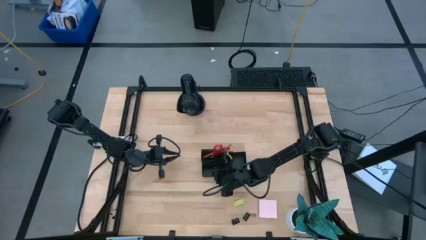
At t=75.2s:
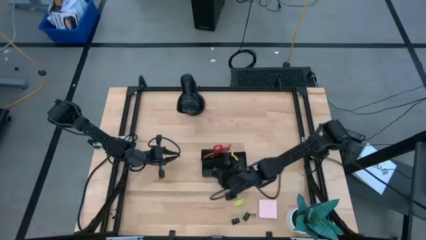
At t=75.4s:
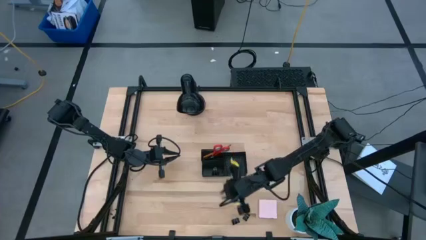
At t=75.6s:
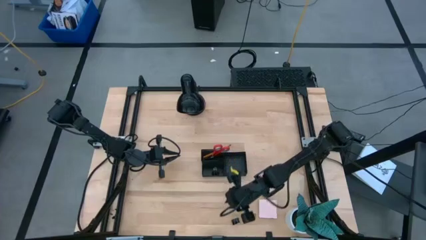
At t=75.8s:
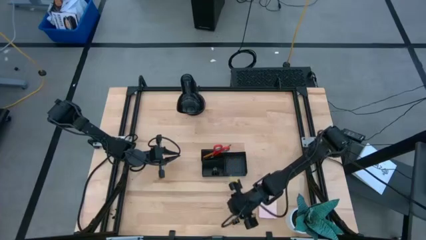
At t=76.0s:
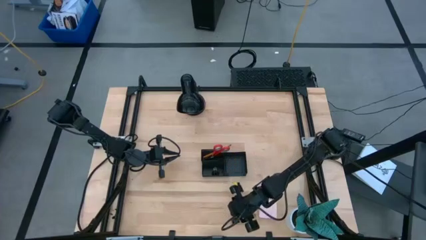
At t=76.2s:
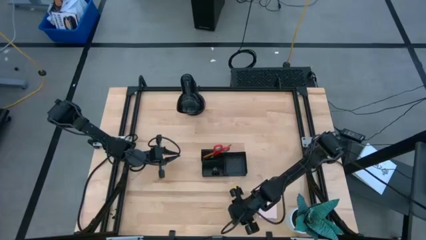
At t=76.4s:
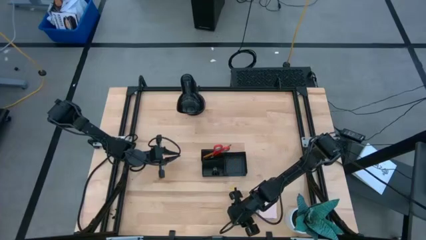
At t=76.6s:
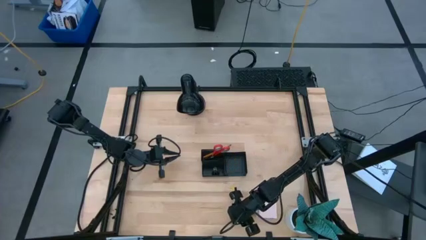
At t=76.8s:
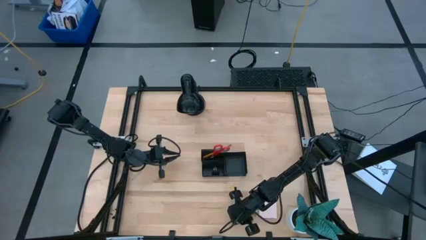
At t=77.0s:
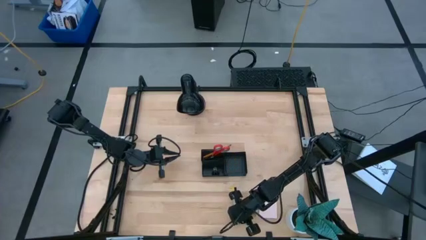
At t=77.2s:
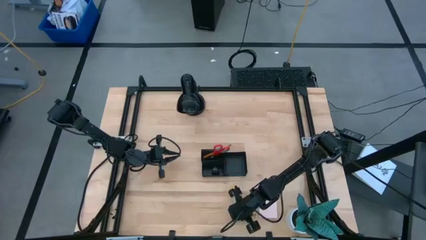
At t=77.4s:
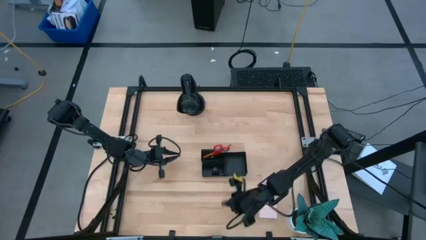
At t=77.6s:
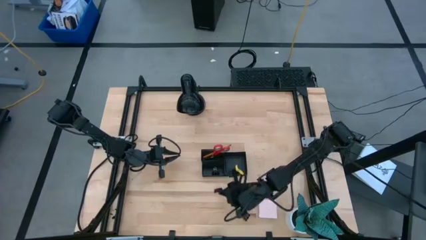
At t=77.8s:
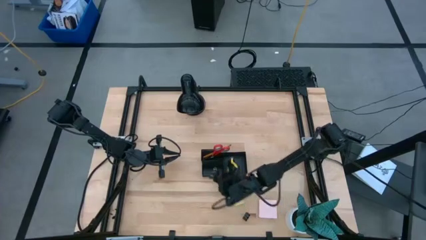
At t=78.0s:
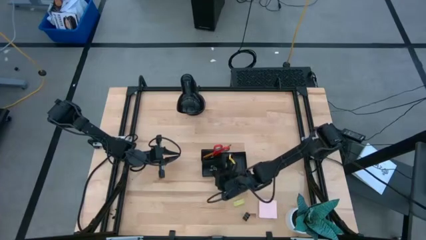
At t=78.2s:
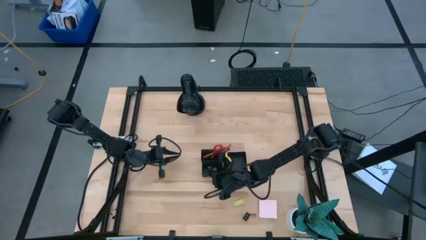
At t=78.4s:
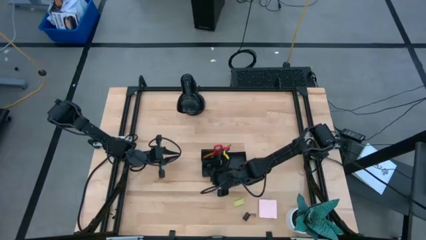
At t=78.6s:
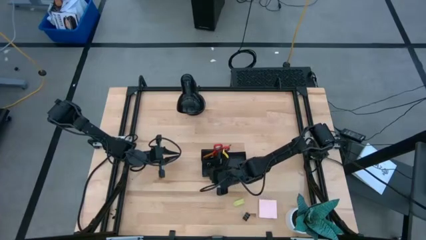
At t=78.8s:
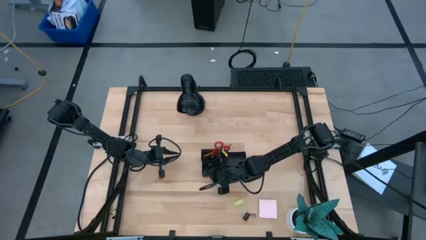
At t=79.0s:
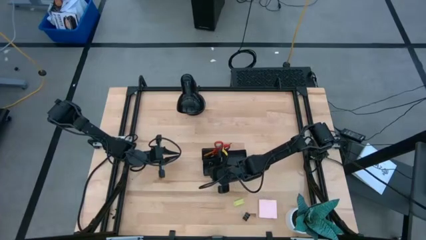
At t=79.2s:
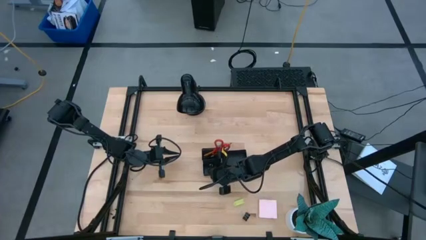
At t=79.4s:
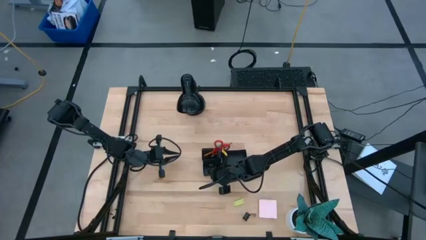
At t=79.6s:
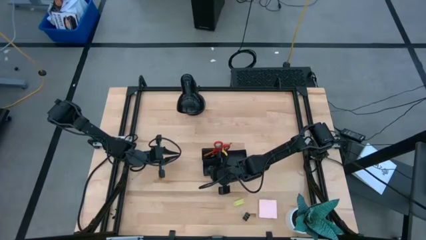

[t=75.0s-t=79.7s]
Task: Pick and place office supplies into organizer
Put the left binder clip into the desk organizer

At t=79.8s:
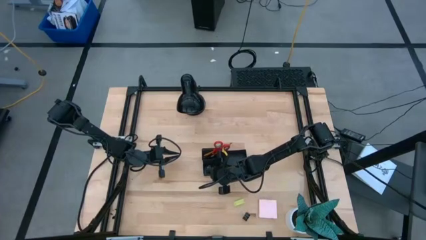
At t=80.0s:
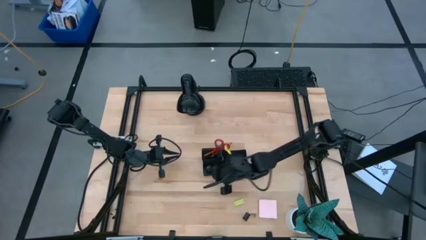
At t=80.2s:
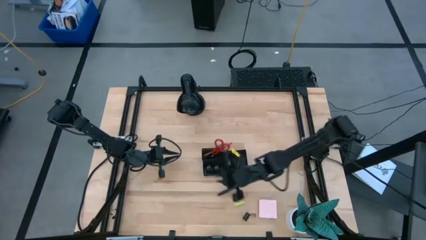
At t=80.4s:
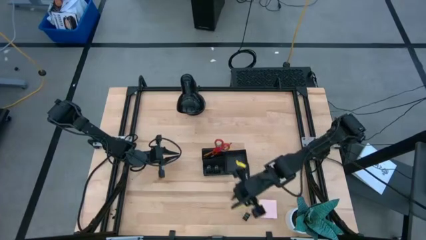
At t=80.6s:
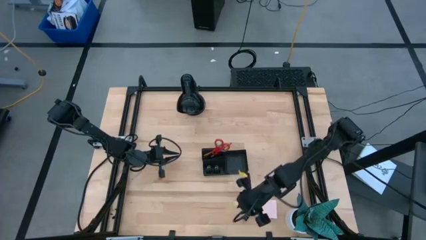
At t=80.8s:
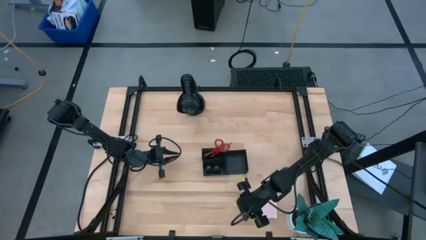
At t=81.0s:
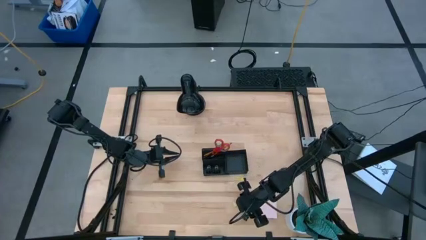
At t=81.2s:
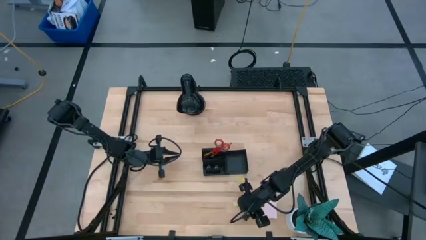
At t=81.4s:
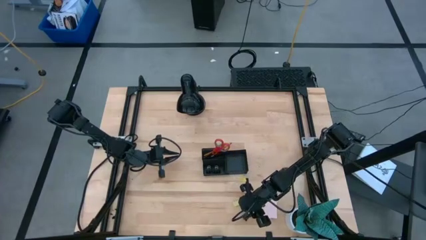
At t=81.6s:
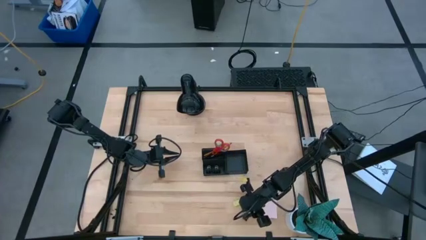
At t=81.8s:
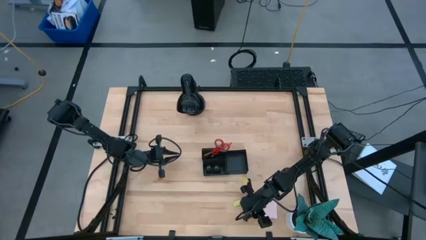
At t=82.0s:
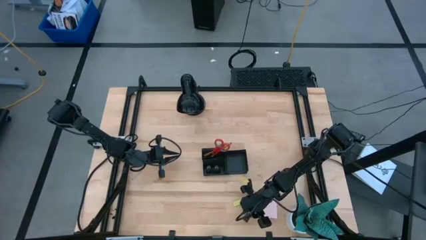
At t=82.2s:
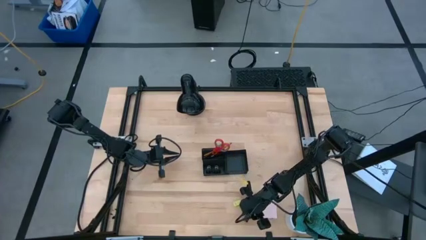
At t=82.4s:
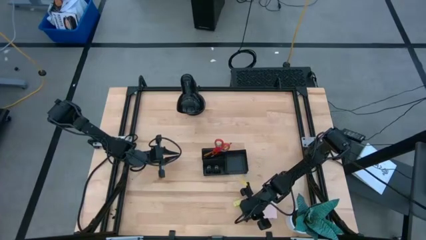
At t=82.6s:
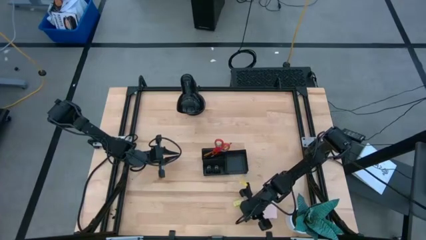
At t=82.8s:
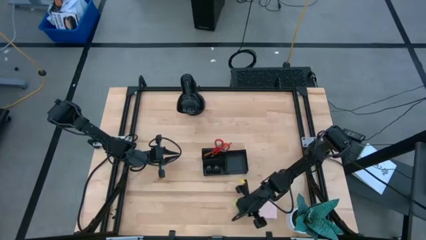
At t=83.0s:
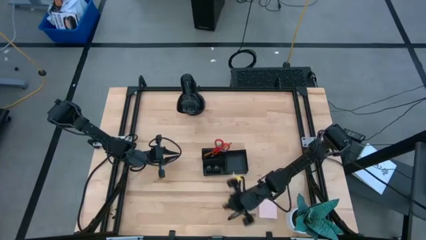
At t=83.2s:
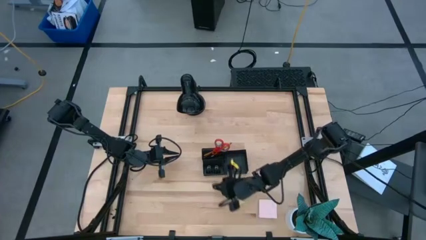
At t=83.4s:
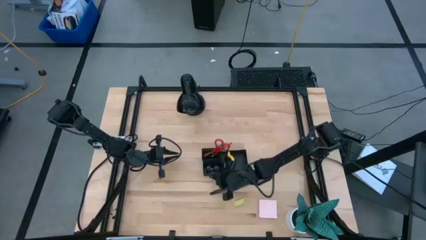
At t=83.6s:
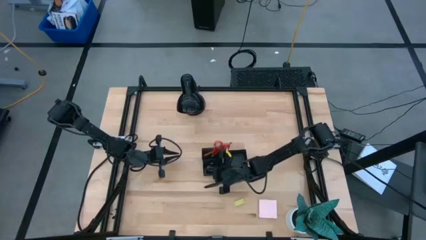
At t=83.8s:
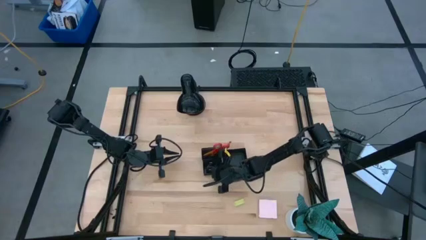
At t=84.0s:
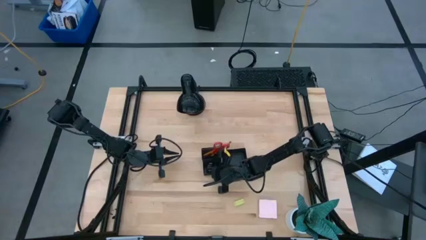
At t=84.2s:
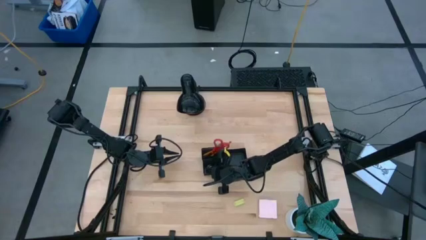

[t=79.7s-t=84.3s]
Put the binder clip into the desk organizer

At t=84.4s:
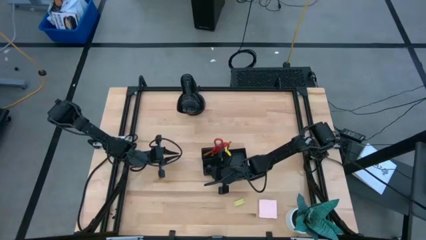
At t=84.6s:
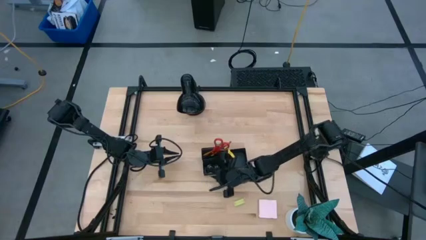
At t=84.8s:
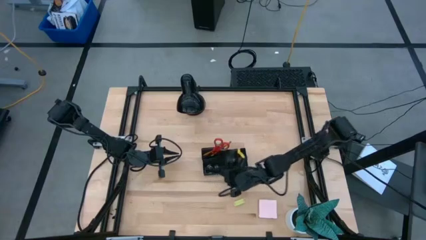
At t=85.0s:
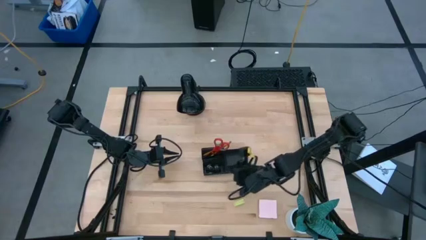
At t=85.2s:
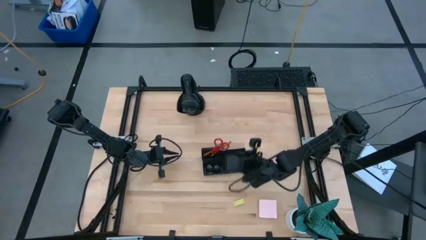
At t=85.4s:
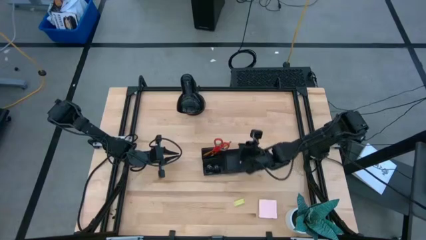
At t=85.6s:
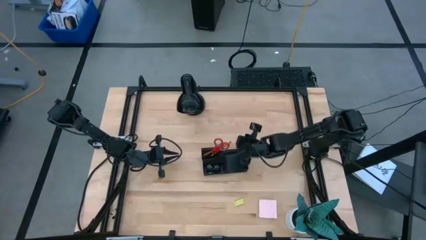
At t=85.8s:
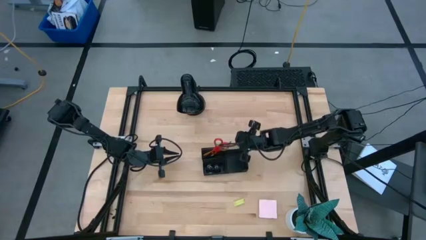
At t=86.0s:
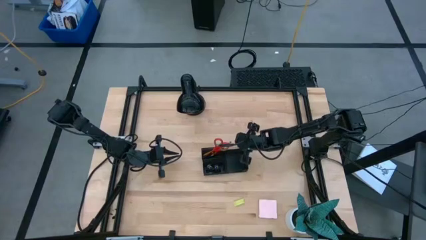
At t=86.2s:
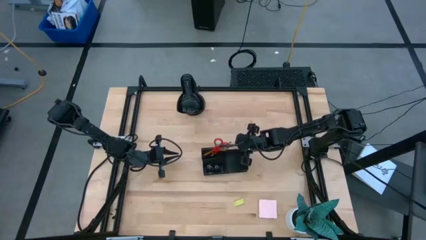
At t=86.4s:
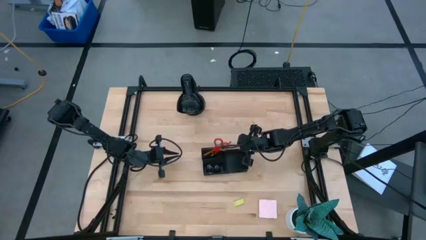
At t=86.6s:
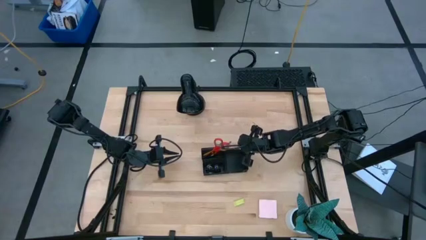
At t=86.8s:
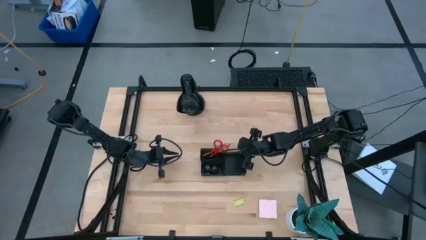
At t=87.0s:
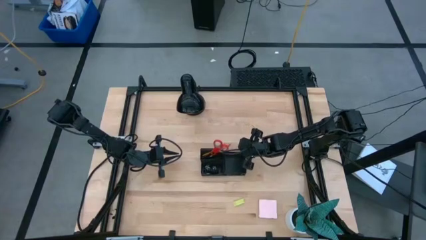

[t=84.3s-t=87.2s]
Adjust the desk organizer

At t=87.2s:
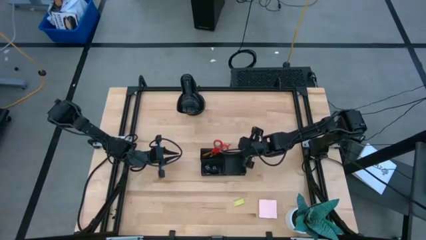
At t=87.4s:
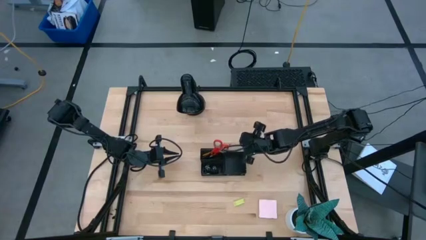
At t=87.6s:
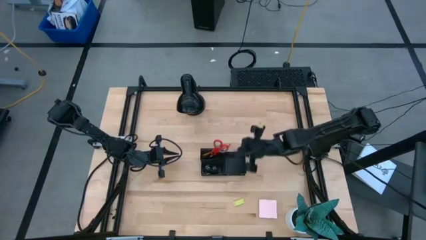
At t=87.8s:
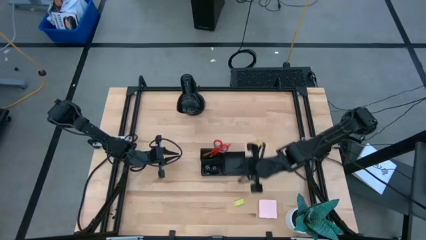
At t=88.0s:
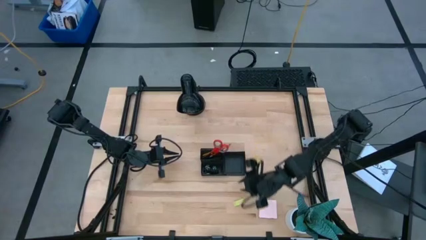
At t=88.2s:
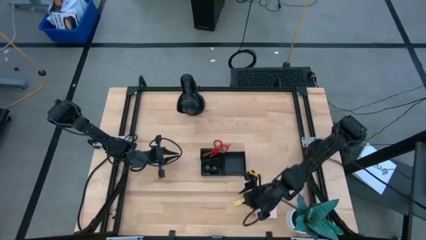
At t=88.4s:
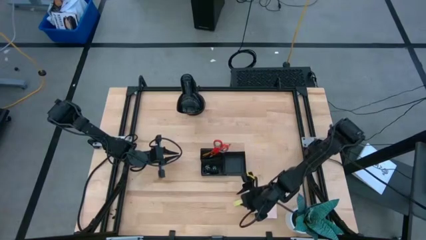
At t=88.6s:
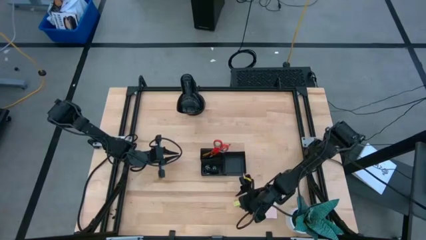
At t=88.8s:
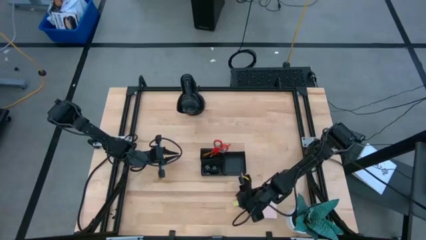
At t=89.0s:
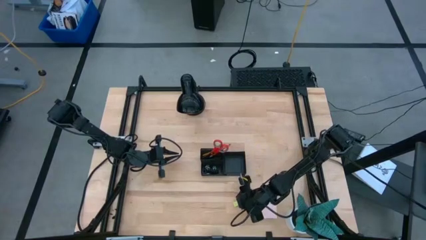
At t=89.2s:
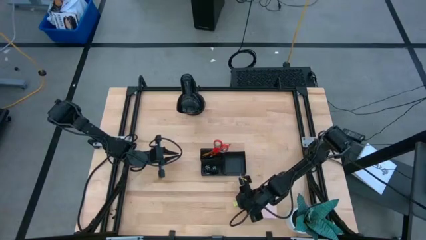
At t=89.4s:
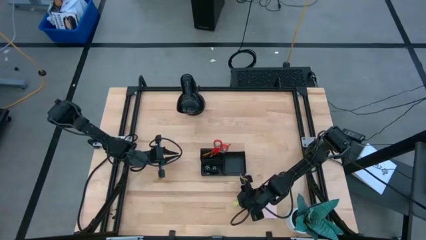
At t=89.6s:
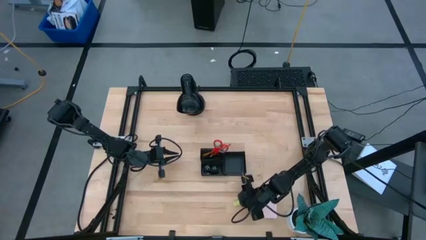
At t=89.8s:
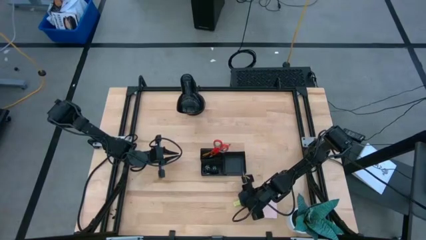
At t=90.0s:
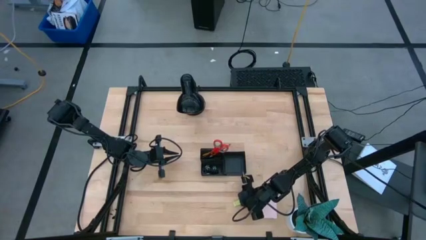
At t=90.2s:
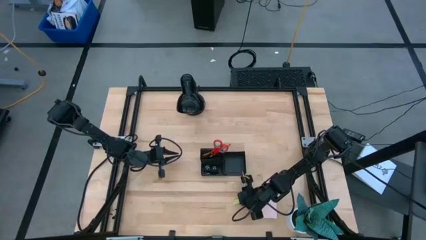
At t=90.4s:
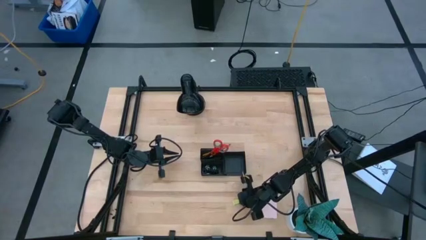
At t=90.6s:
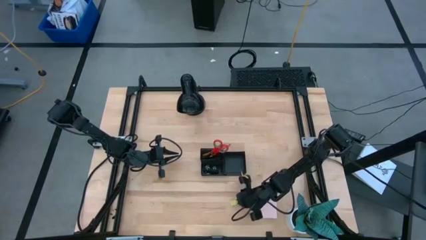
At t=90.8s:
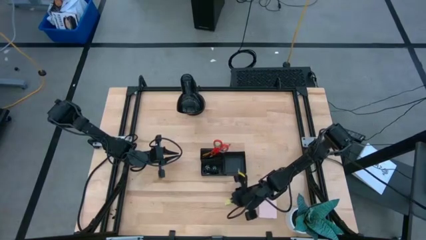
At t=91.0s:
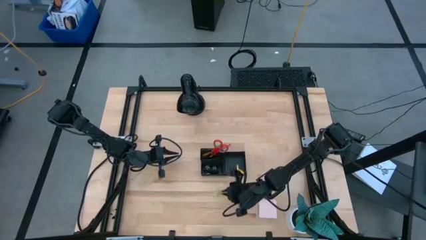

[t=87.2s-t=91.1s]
Put the eraser into the desk organizer

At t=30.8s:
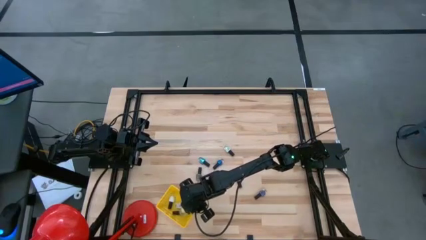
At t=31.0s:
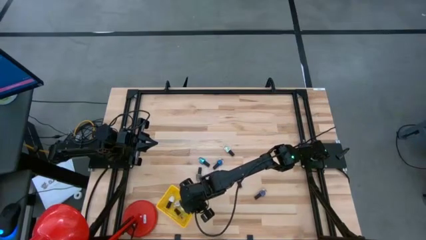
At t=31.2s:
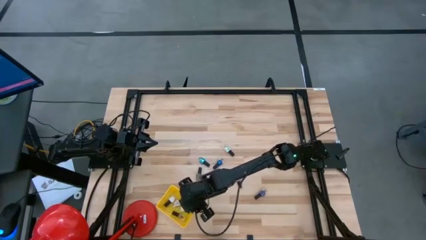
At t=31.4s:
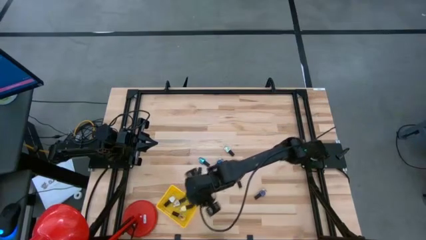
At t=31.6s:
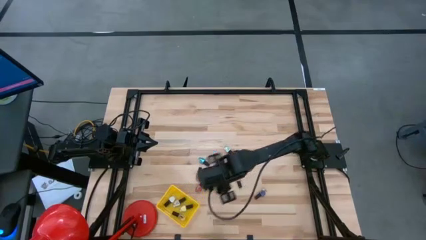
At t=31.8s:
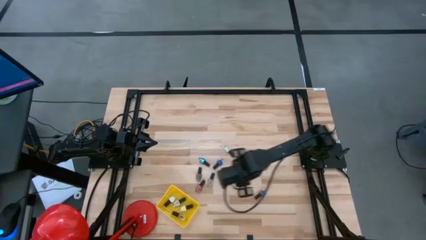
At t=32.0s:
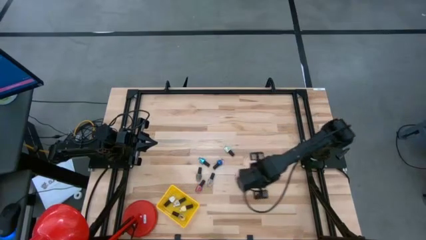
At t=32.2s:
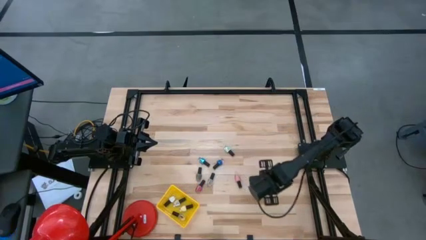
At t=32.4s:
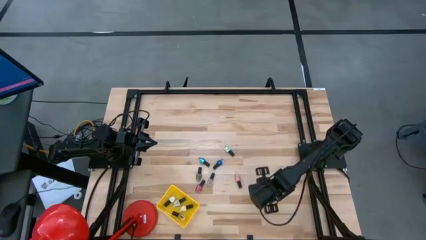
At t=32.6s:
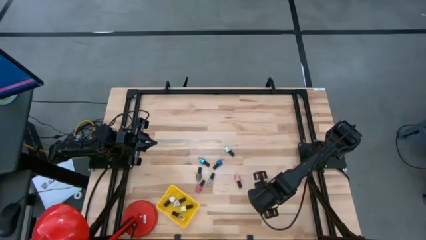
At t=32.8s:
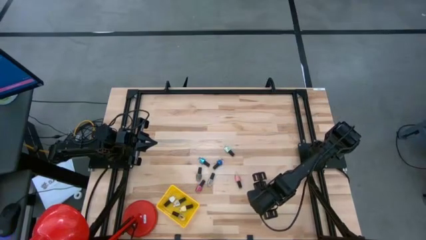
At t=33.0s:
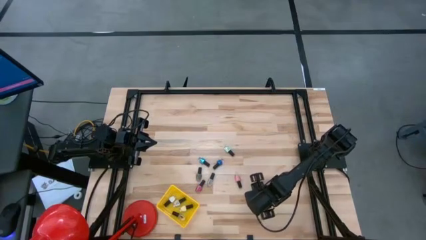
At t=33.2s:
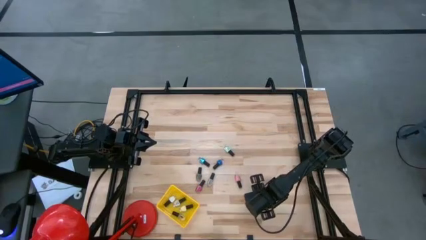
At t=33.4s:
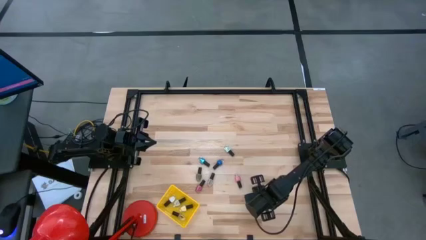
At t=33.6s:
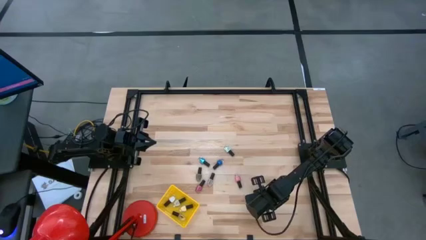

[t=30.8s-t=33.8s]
Task: Pick & Place Nail Polish
Put the purple nail polish into the yellow basket
